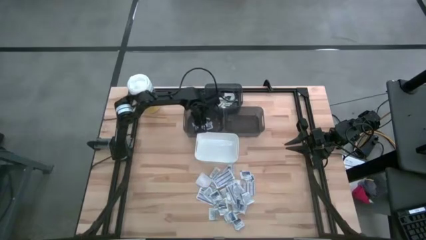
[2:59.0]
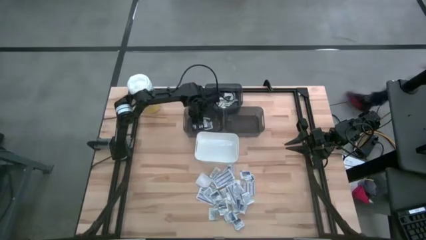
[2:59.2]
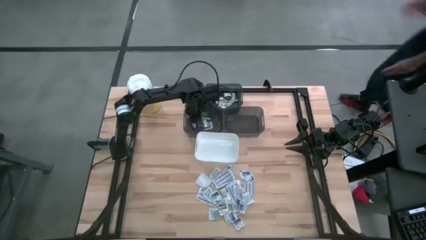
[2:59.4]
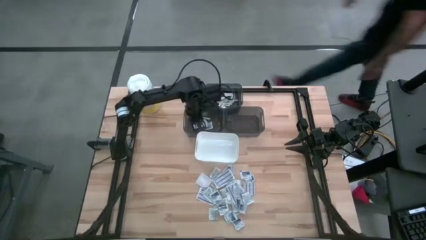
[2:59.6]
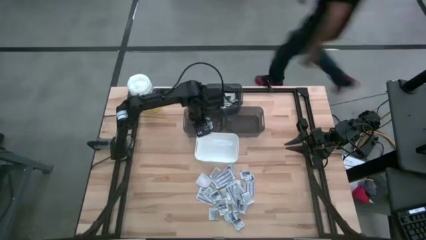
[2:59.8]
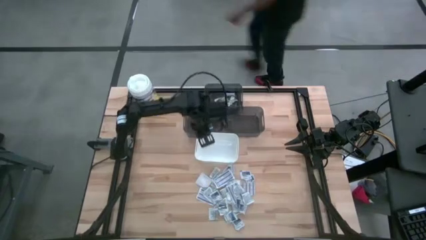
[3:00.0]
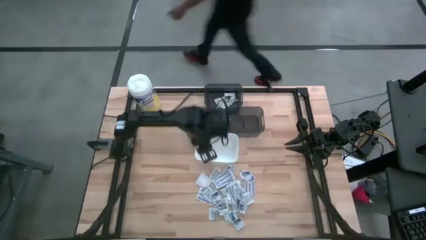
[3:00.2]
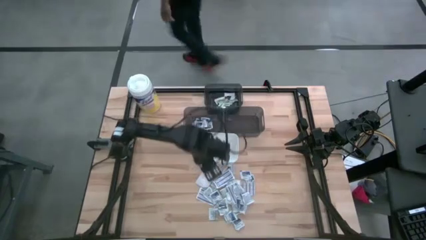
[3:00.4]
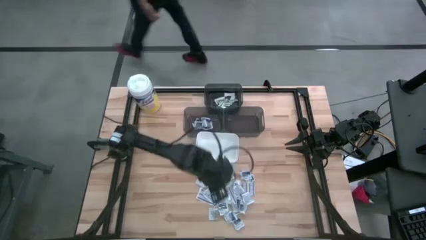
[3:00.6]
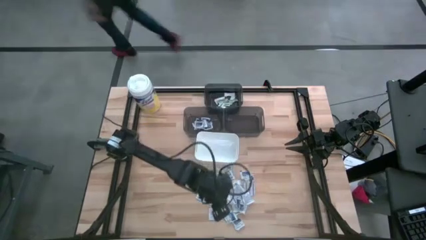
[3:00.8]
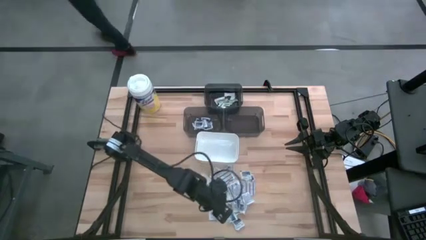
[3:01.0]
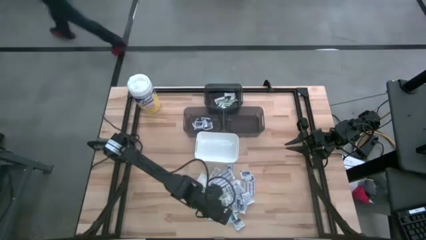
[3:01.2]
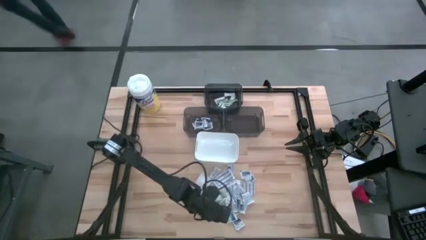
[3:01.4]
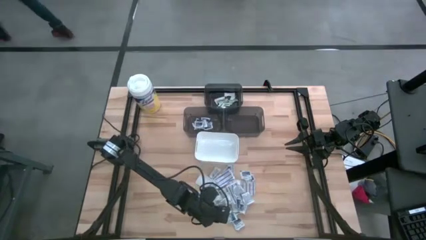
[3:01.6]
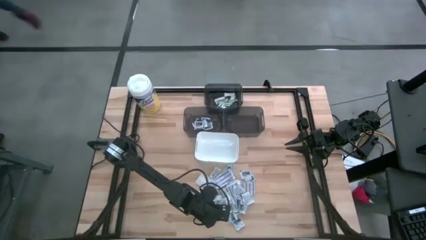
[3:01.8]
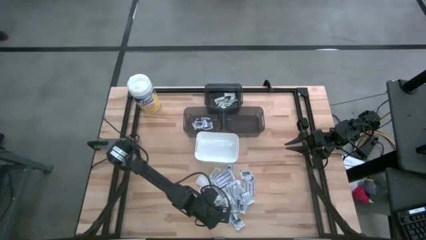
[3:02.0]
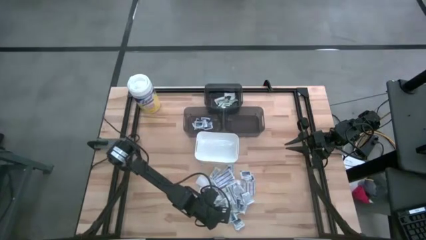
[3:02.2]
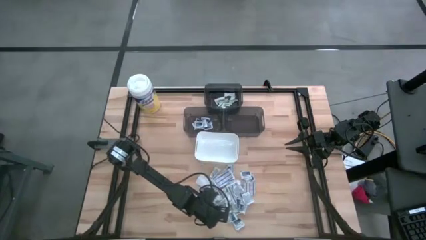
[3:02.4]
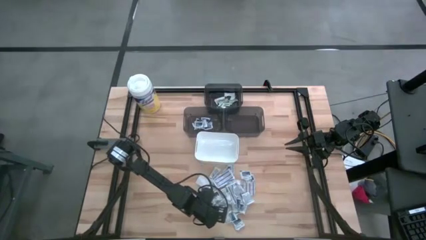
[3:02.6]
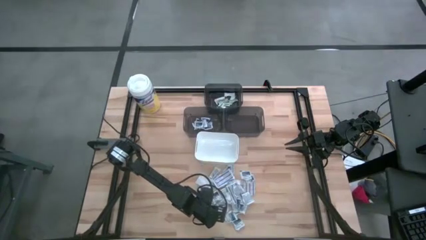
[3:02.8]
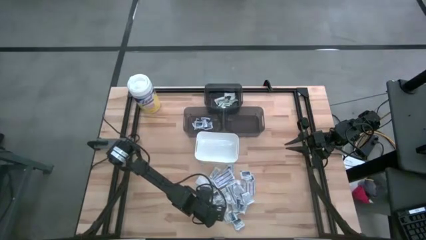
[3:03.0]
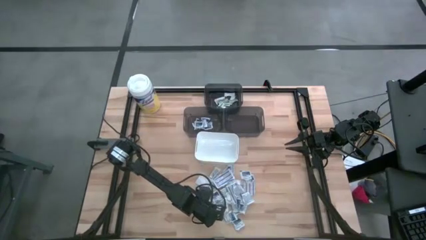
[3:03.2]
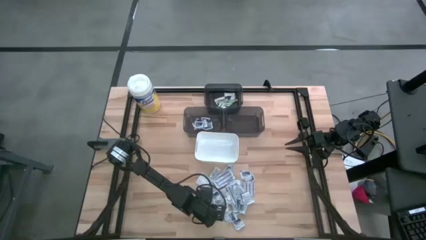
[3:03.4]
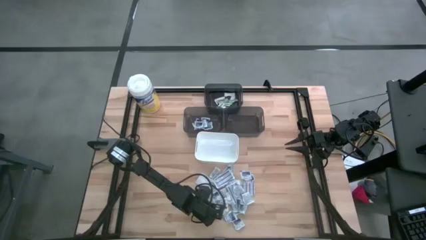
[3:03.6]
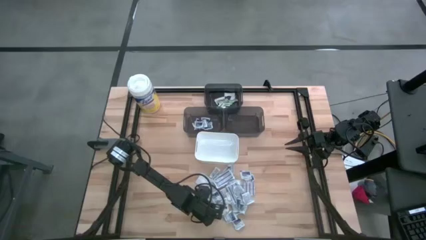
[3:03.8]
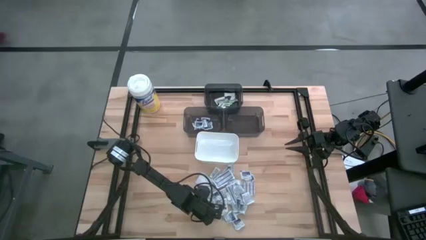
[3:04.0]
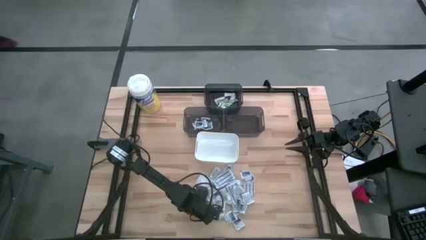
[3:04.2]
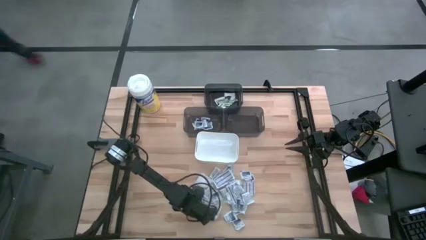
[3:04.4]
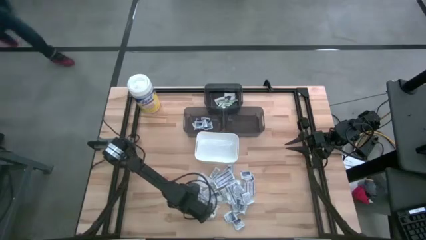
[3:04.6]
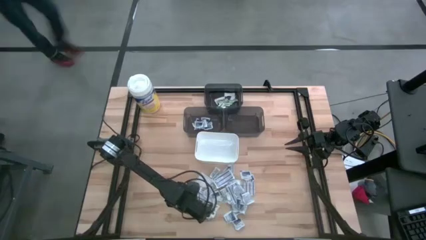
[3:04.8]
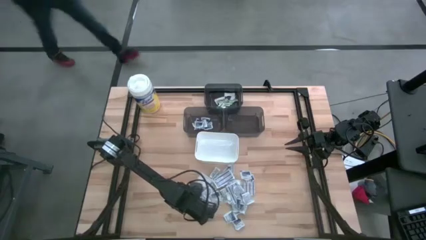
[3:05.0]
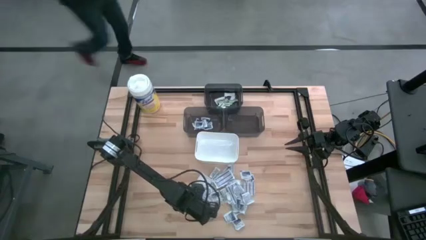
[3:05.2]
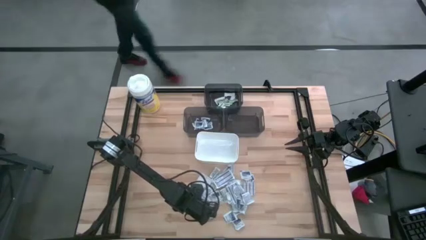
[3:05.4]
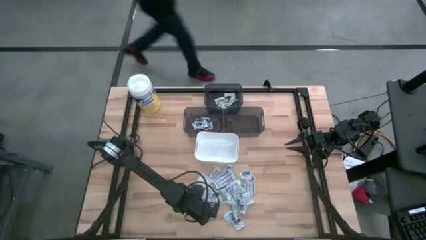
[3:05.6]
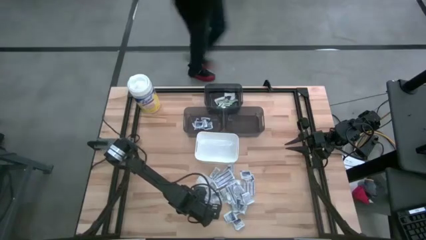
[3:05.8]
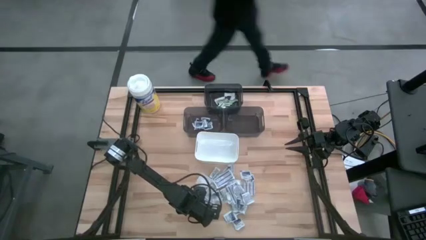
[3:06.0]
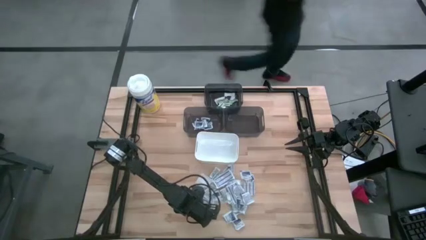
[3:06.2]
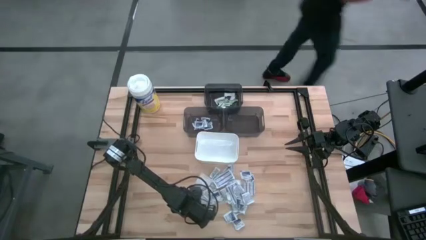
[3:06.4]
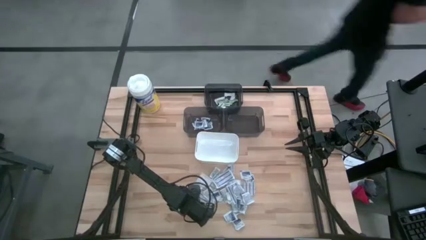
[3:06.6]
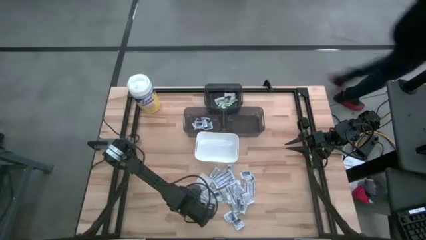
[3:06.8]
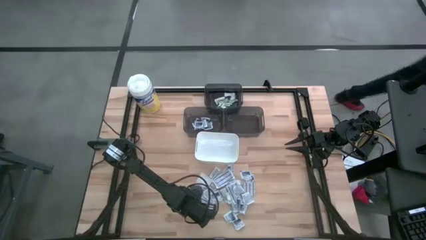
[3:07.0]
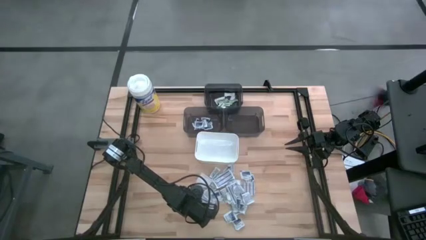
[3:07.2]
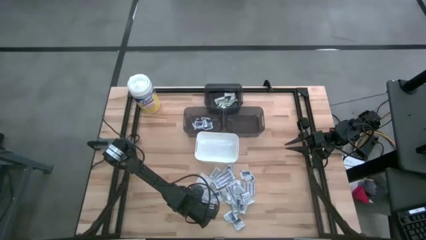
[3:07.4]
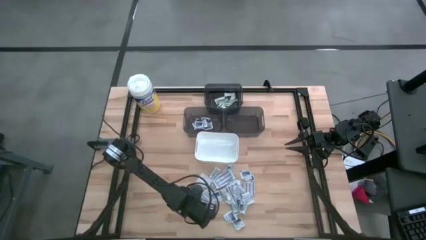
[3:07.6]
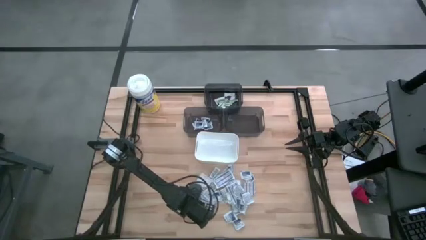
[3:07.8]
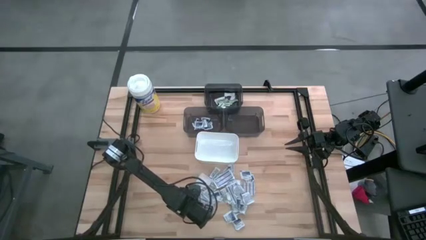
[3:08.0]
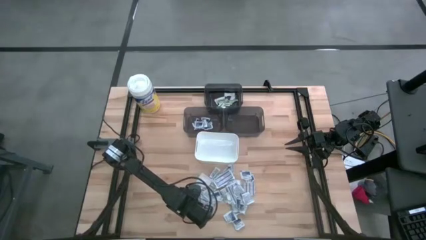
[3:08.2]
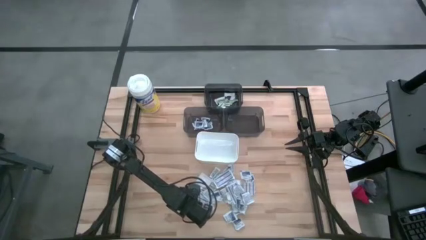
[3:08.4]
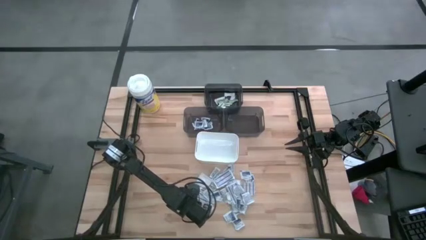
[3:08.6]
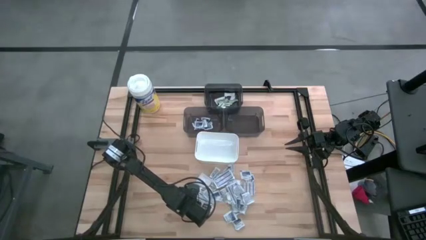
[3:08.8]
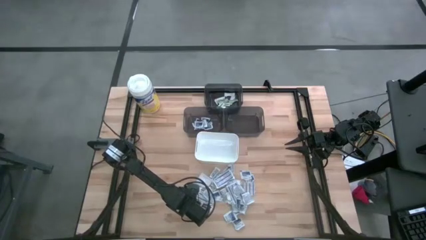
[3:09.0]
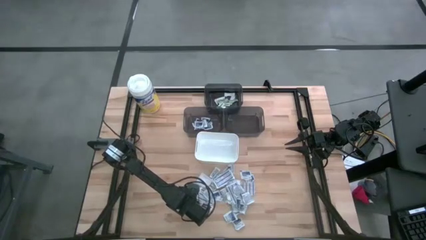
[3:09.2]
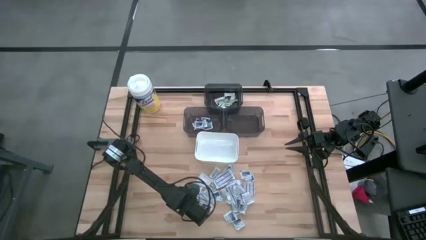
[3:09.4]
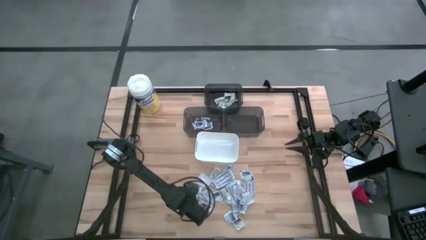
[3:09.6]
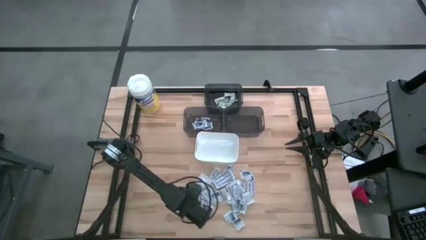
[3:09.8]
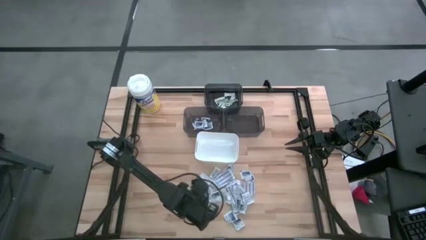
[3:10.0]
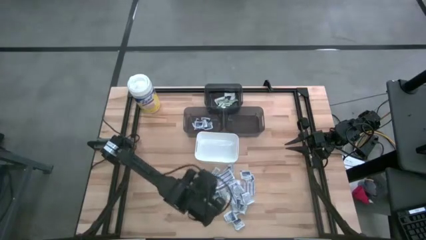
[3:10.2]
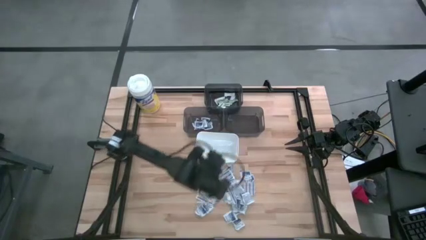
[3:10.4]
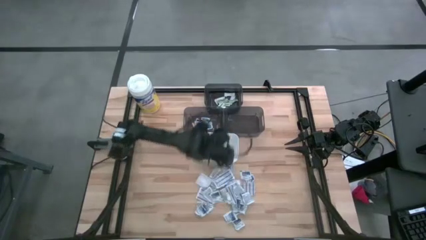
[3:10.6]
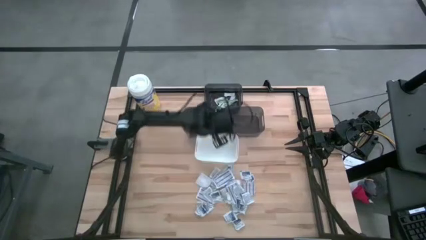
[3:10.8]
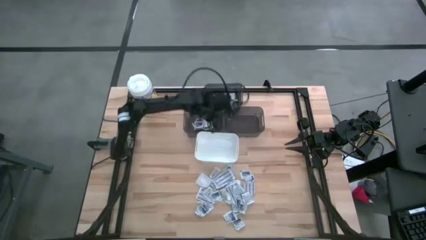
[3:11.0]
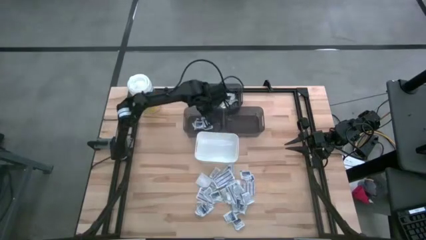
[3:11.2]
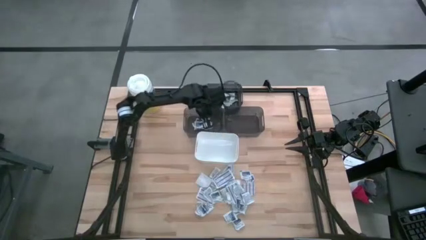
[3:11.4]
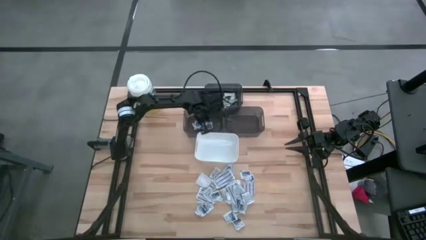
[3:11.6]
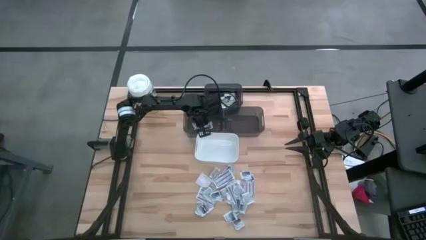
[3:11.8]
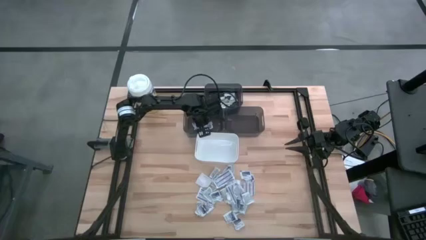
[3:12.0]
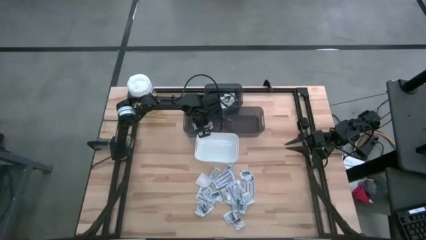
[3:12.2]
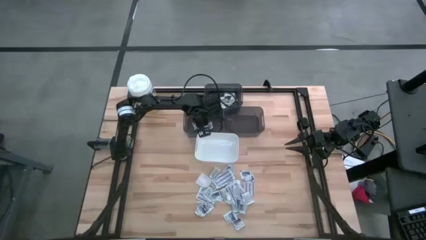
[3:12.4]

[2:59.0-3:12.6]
Task: Pick & Place First Aid Supplies
Put the alcohol pad into the left black bin

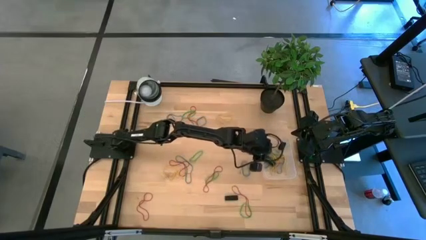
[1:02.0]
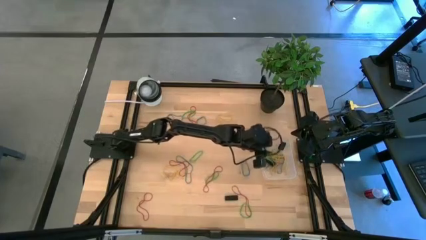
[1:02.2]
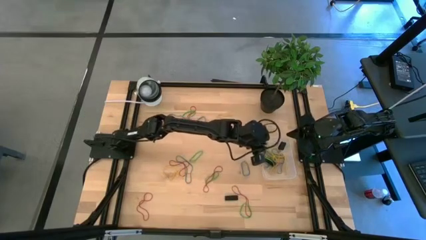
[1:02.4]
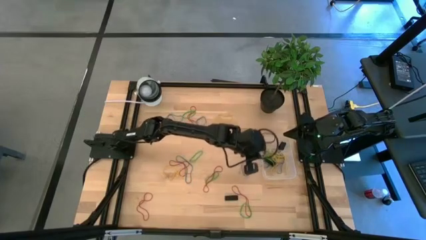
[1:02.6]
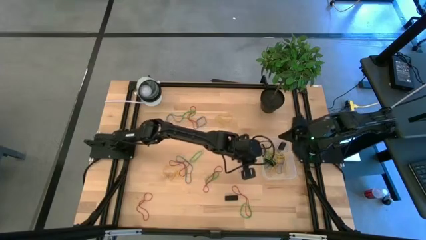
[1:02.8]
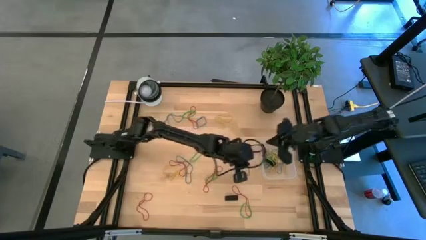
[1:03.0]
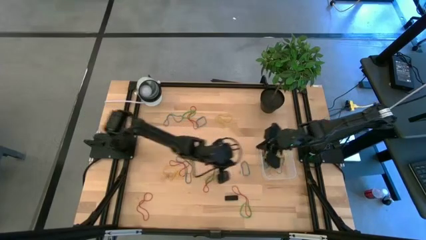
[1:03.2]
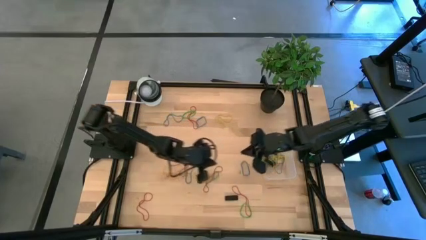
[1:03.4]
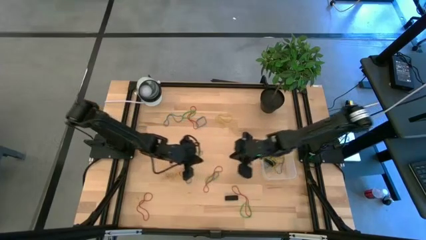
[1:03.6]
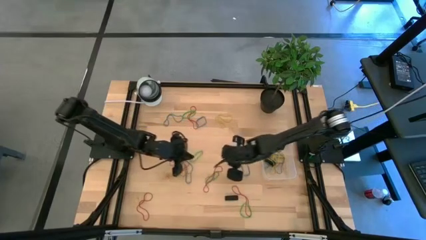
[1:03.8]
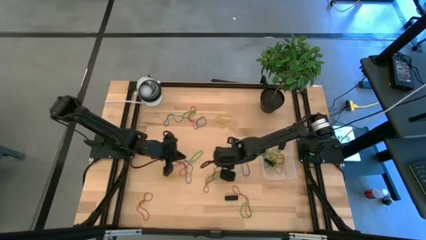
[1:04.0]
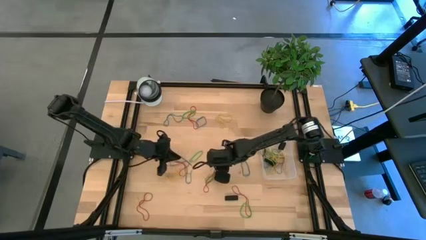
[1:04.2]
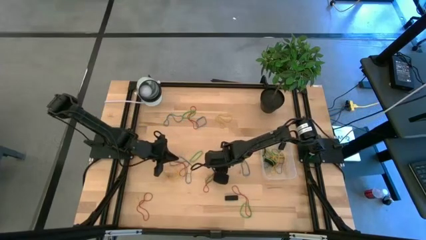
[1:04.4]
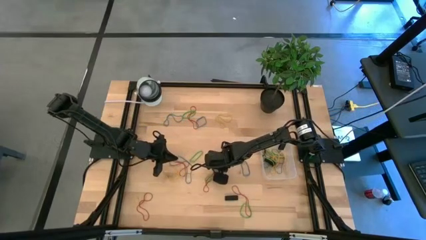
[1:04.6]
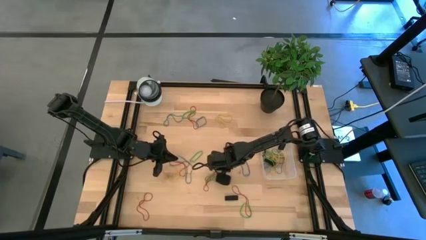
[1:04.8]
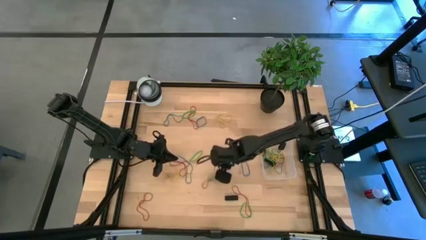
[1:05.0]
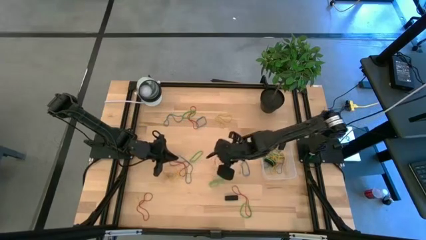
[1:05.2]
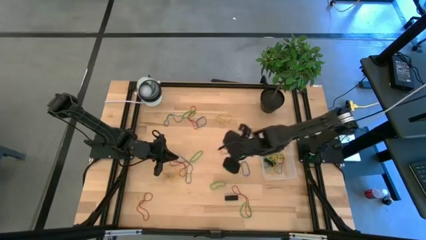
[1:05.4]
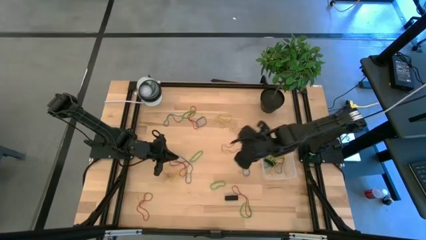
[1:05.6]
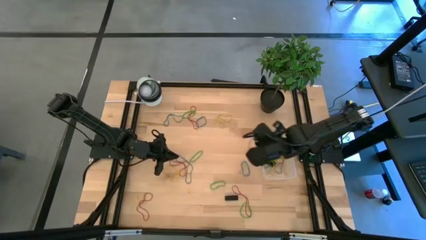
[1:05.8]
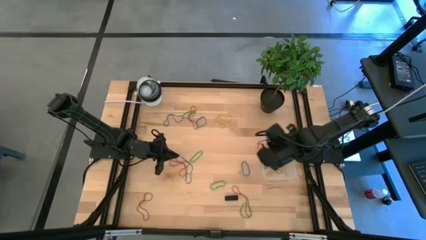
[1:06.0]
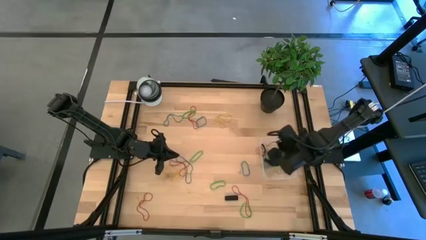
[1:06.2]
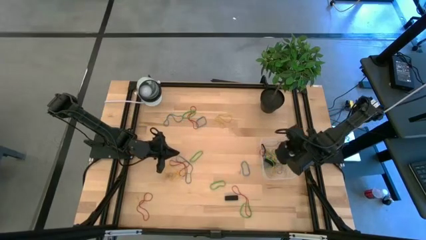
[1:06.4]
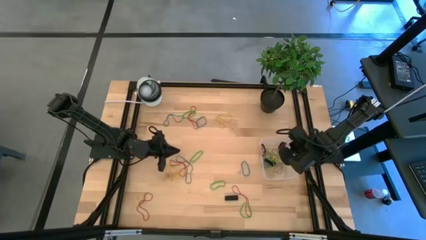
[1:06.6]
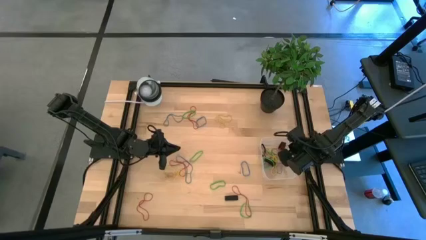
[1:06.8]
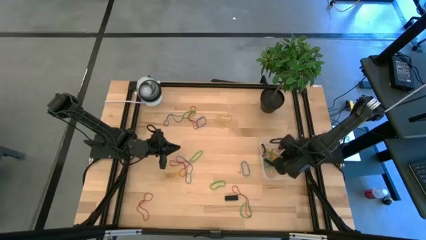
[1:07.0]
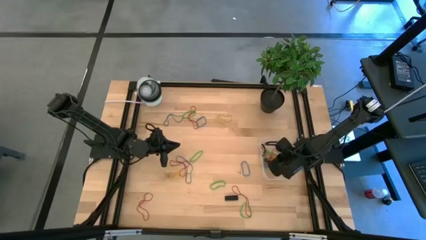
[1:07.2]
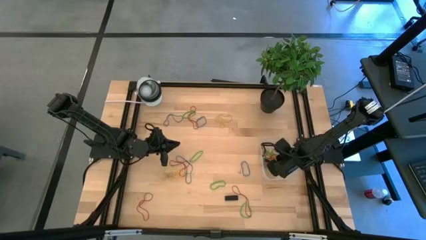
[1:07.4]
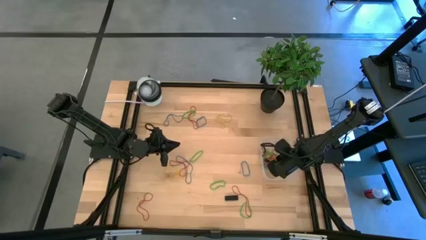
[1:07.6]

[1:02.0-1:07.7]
Task: Pick and place rubber bands into bin
Put the red rubber band into the transparent bin
